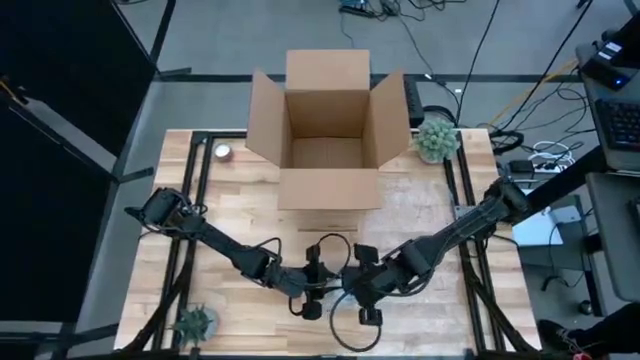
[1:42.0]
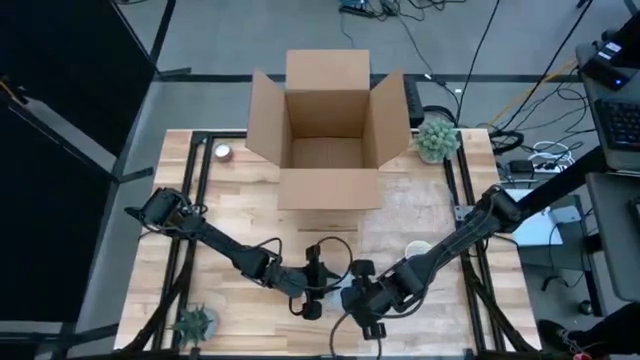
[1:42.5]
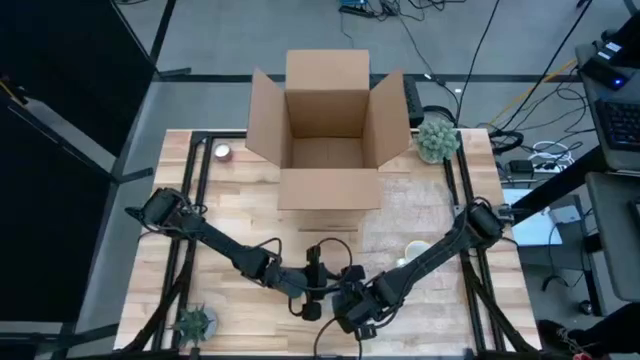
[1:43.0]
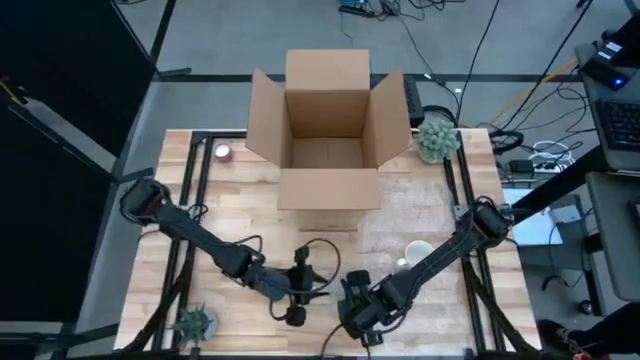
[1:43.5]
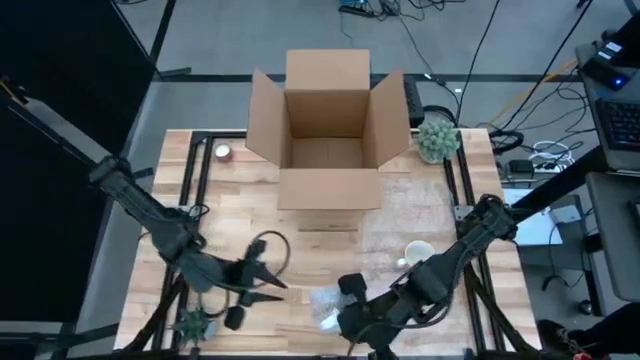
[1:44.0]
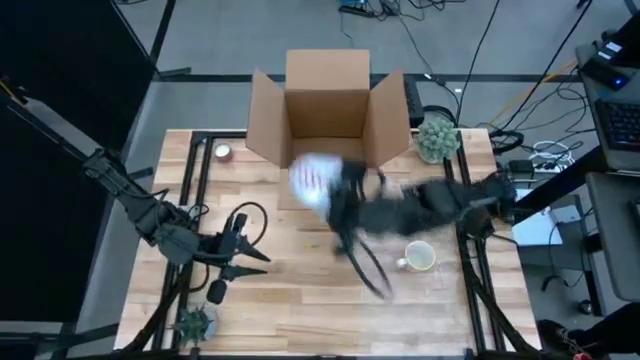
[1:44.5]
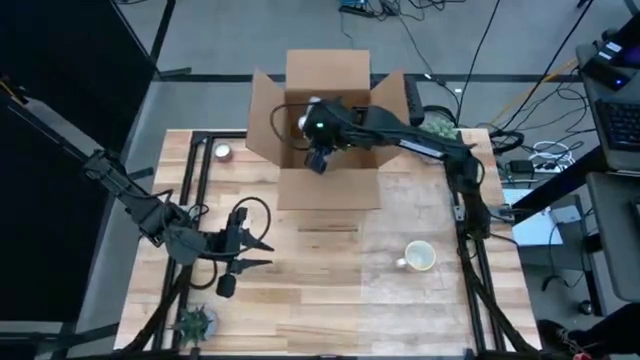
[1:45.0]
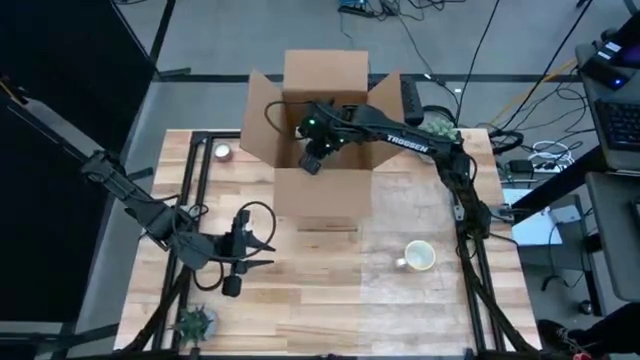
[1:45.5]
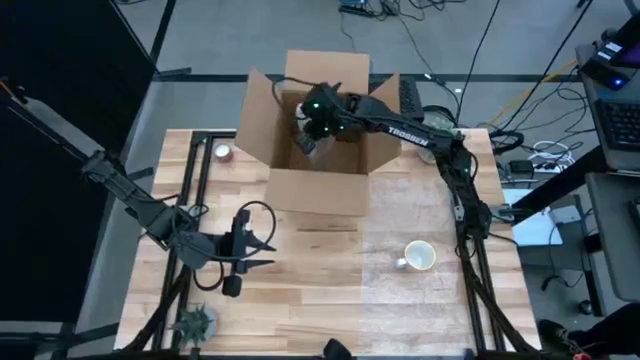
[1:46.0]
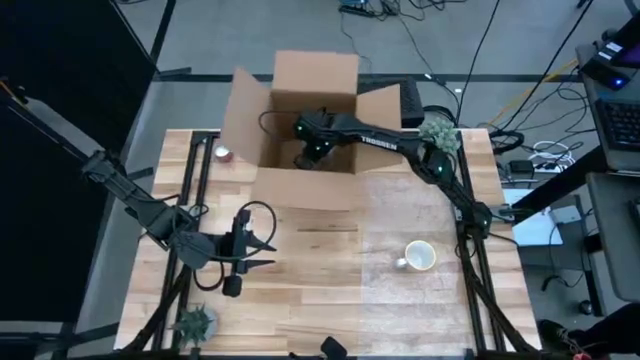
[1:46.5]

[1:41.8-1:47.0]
Task: wrap mug
Put the wrapped red cup into the cardboard box

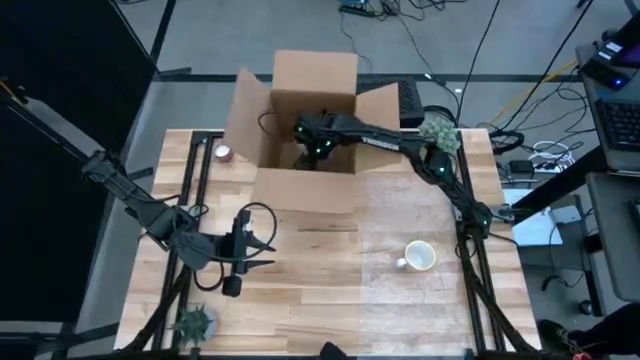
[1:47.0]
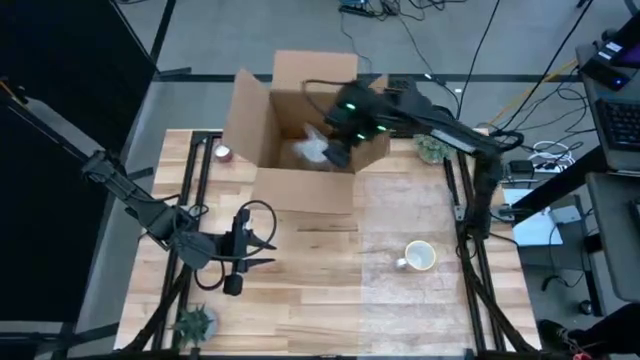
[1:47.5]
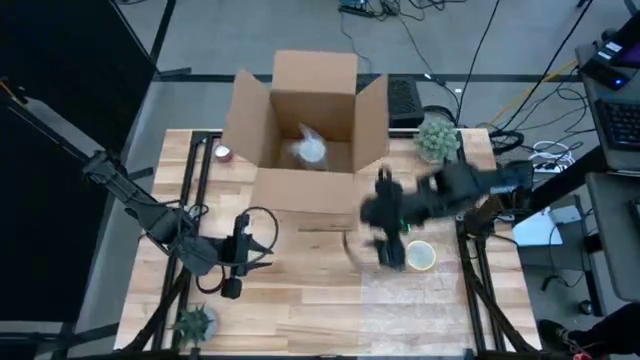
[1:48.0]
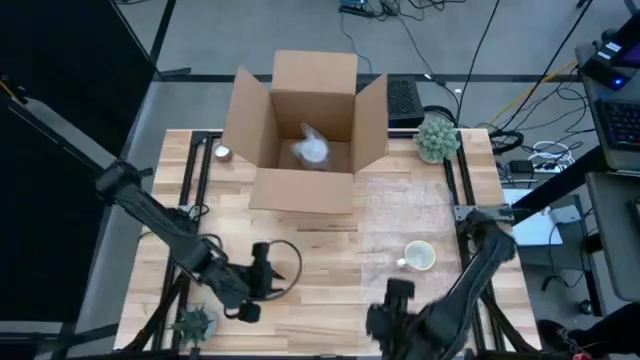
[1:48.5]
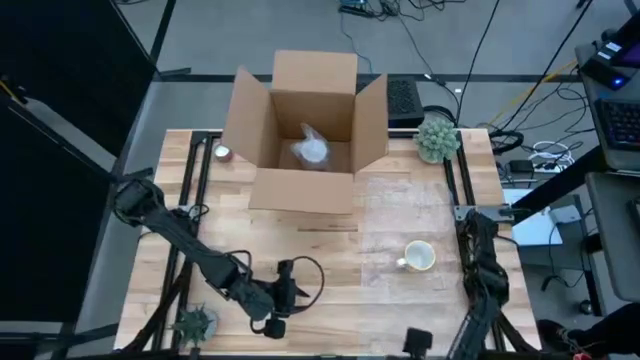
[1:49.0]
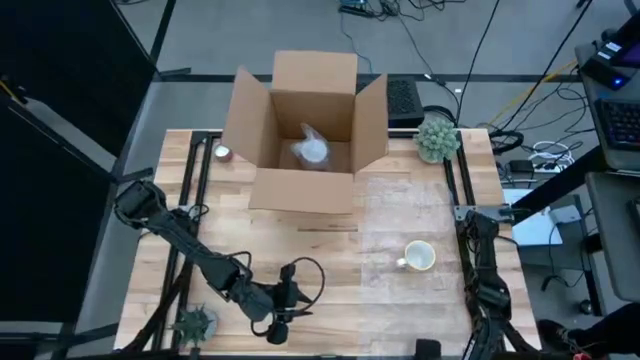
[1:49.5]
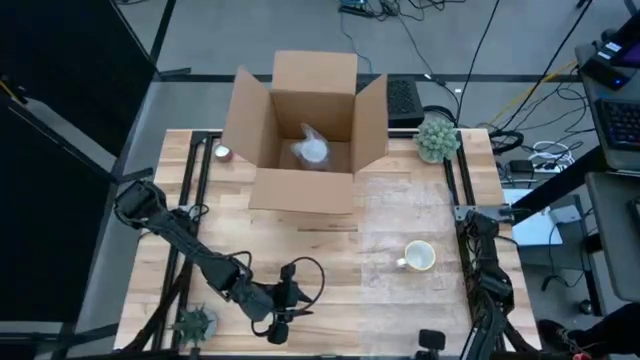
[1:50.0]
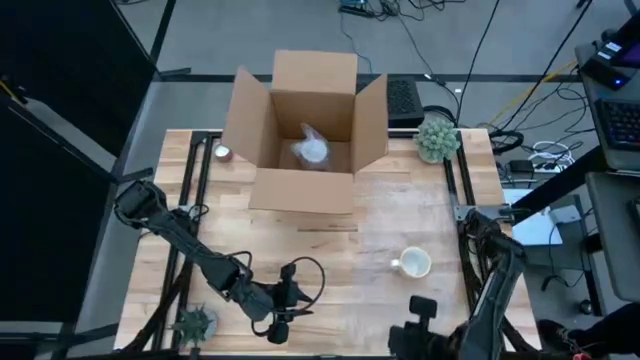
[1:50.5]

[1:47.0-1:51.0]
Wrap the orange cup with the transparent bubble wrap

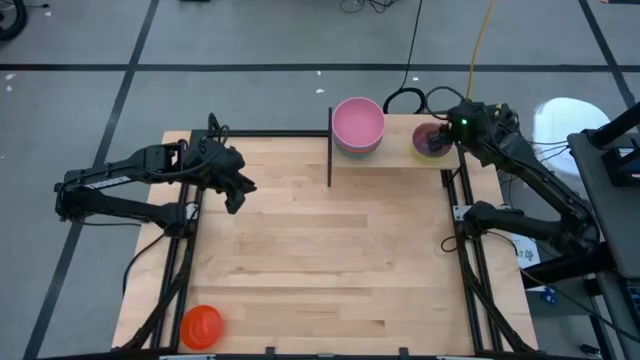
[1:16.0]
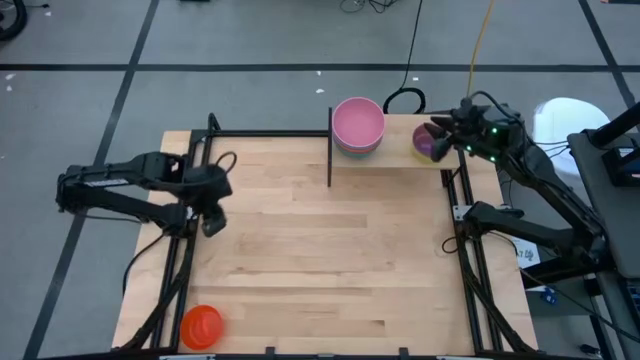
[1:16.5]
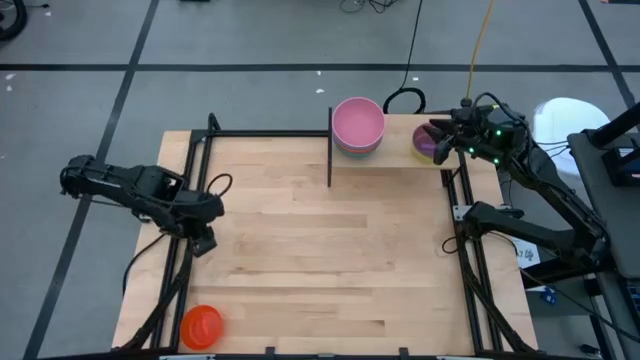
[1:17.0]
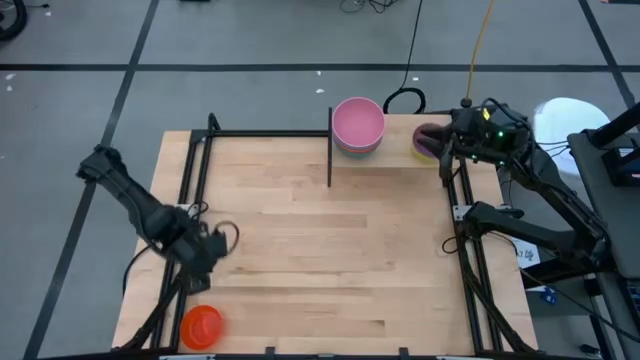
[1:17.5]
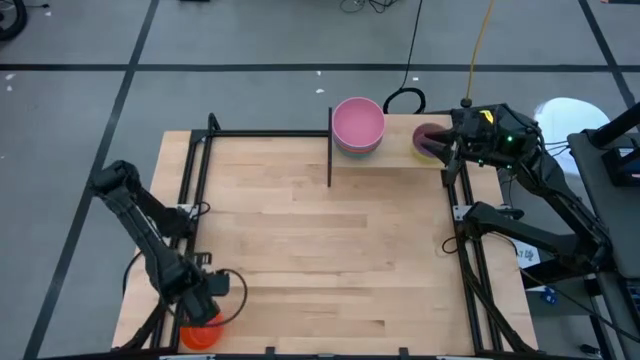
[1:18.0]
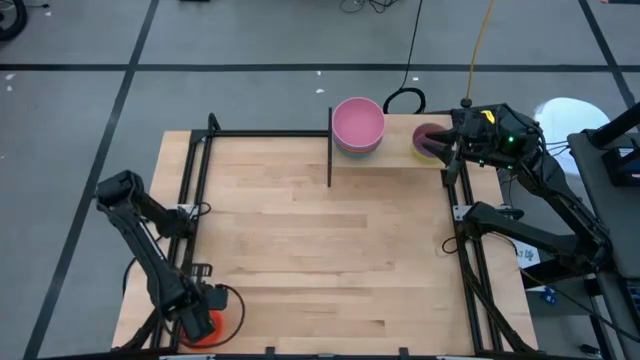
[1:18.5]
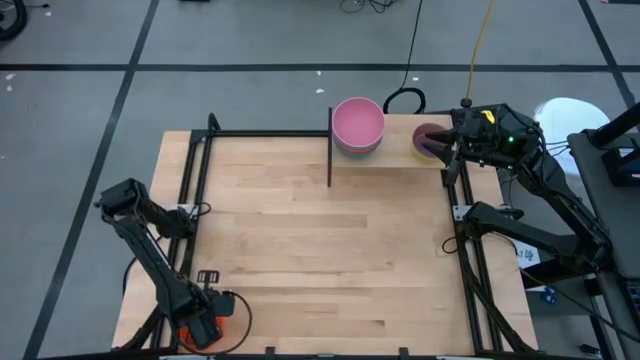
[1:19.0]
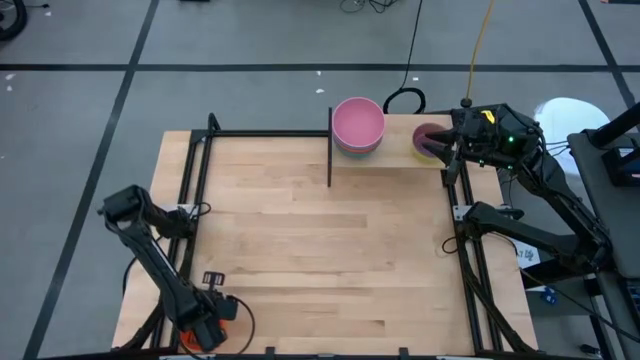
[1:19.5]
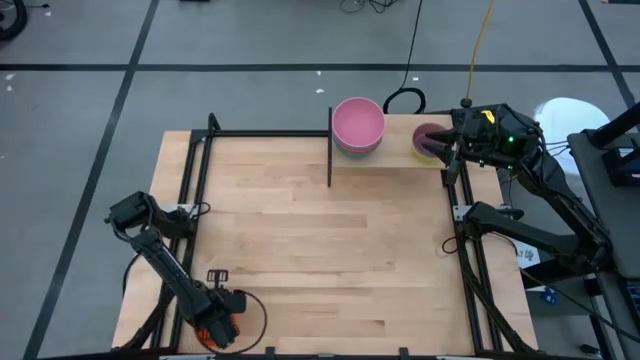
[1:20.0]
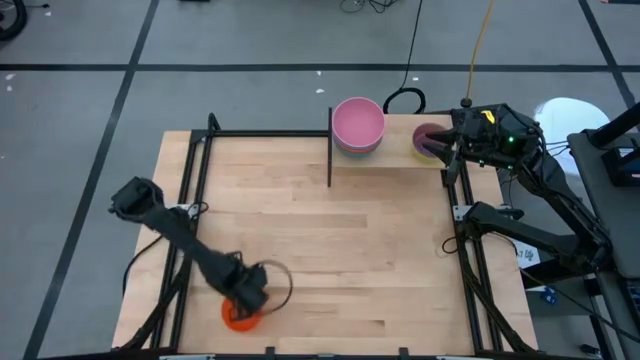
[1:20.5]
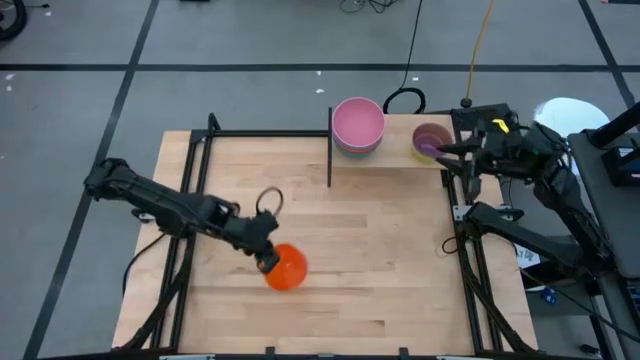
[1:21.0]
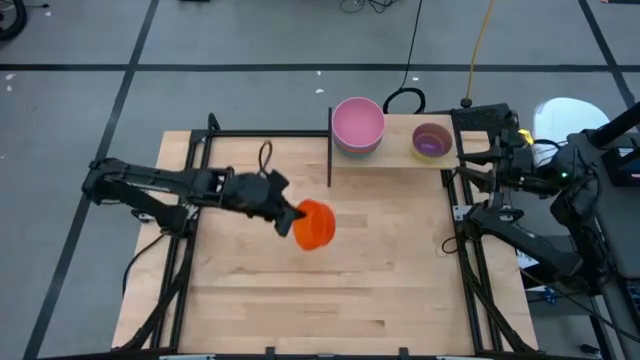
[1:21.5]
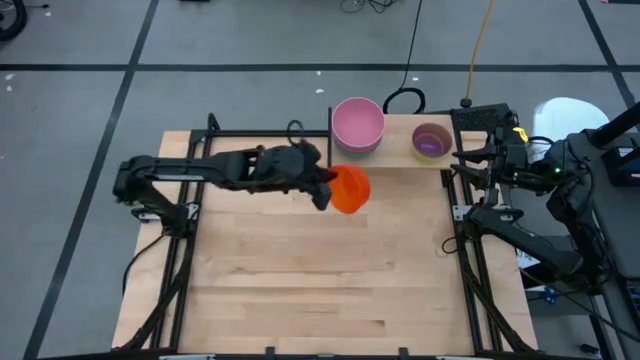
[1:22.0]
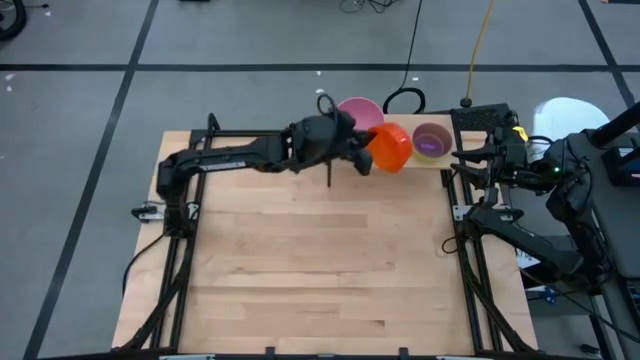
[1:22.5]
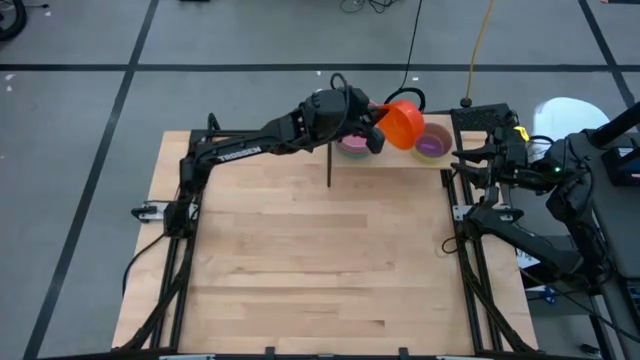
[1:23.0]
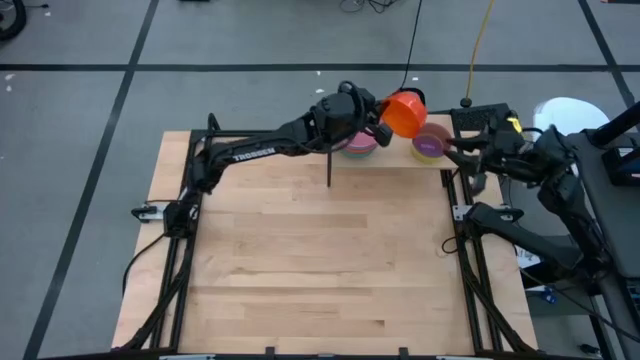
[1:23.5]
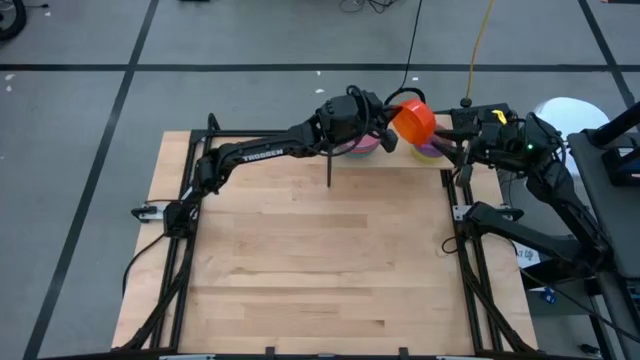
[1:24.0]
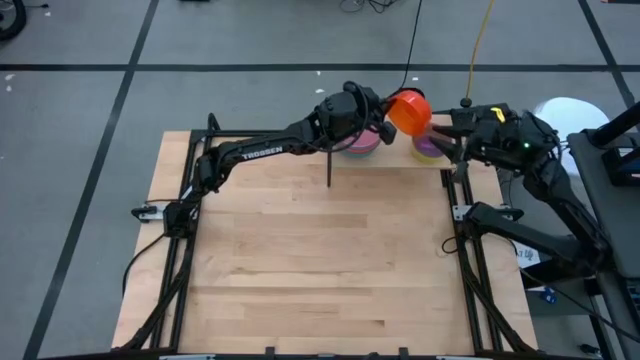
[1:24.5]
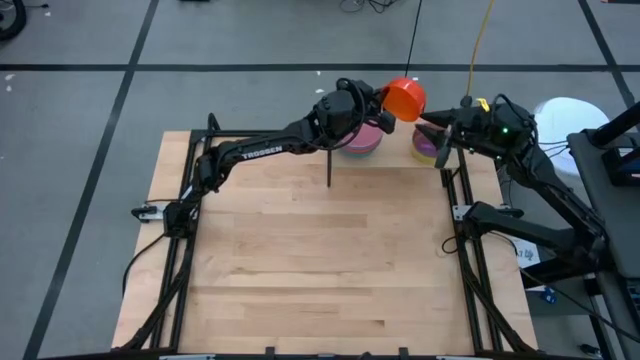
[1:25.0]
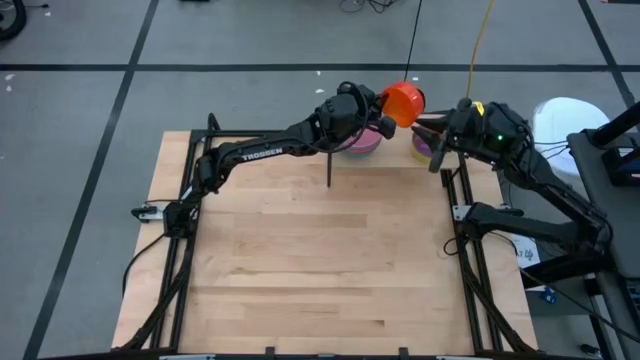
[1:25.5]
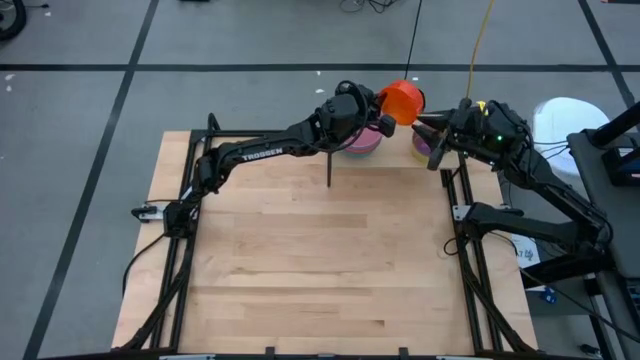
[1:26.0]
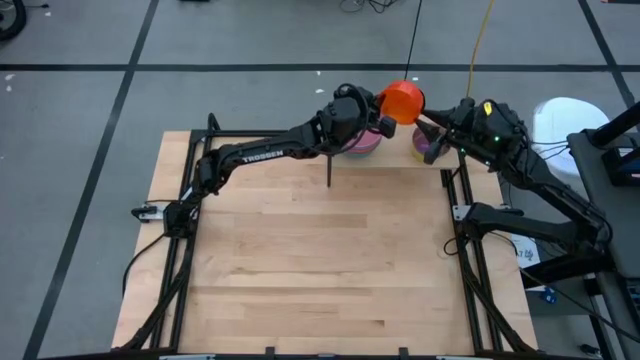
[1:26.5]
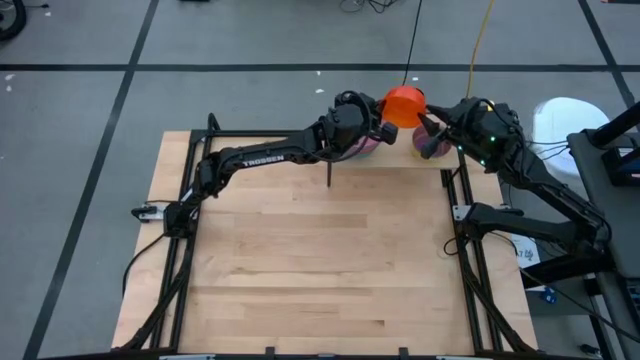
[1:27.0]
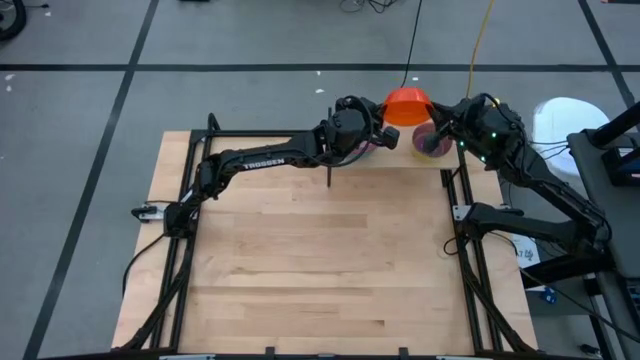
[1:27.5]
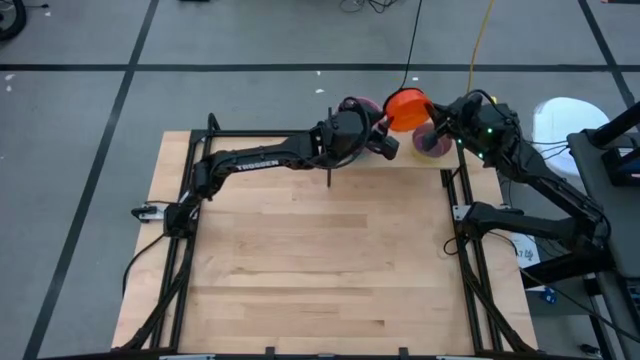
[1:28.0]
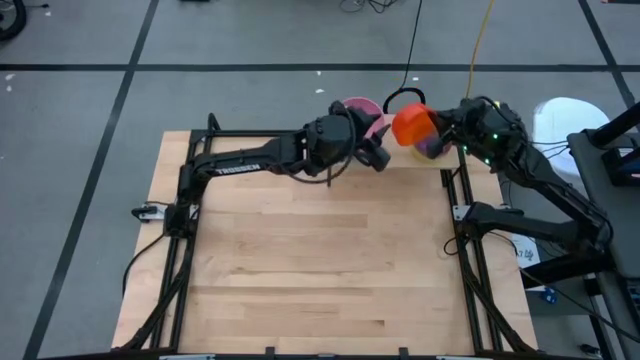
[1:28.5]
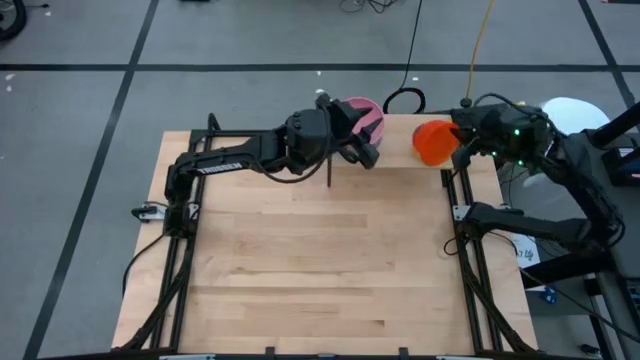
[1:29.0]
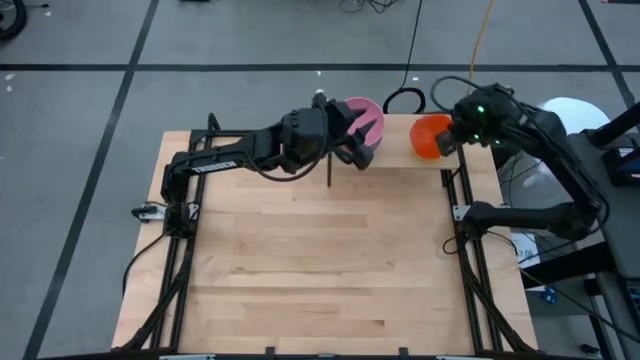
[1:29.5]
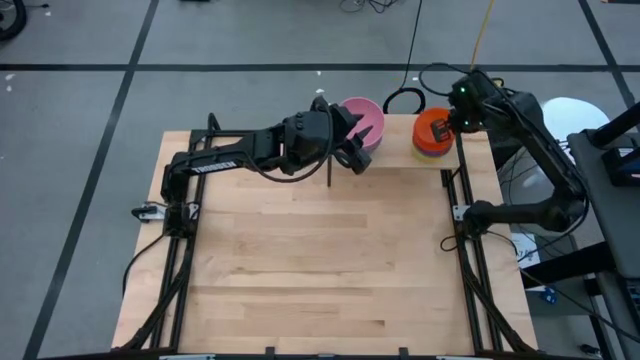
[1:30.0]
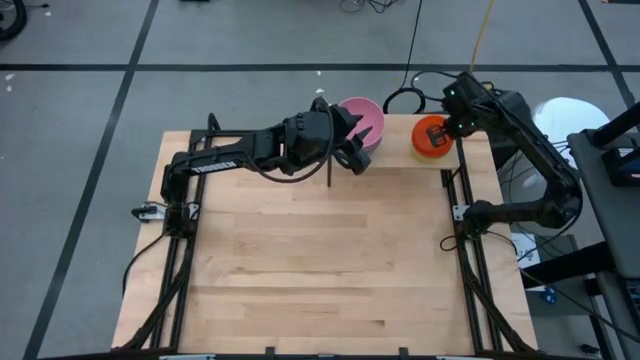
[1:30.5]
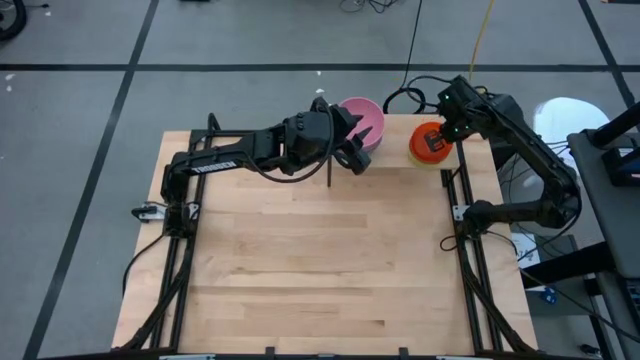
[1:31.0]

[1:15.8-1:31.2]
Task: Place and stack bowls onto a shelf
Stack the orange bowl on top of the purple bowl on the shelf
